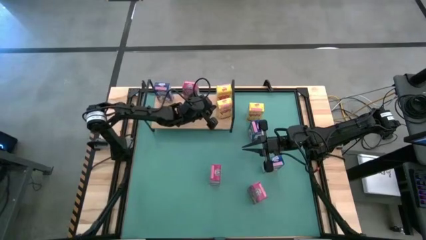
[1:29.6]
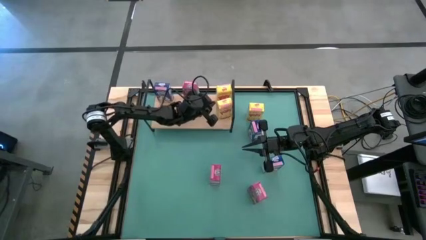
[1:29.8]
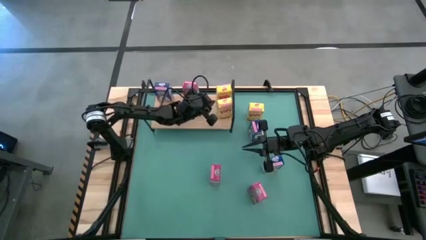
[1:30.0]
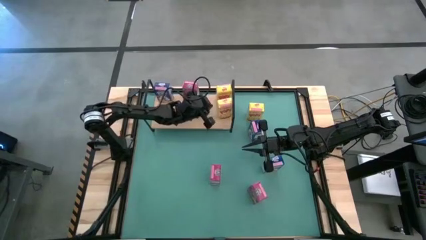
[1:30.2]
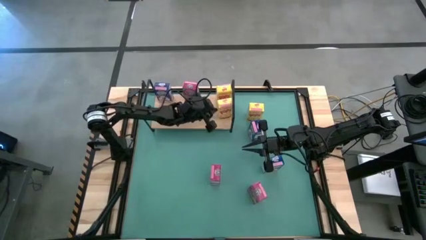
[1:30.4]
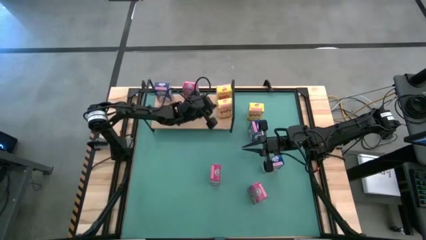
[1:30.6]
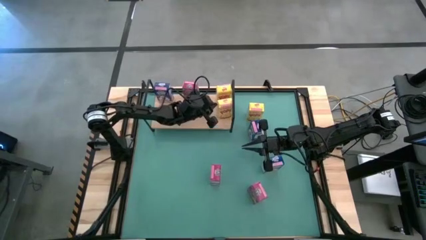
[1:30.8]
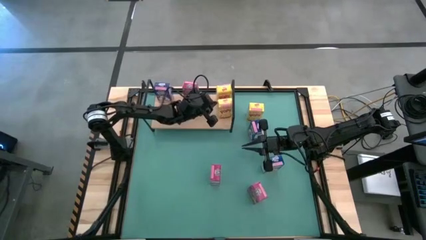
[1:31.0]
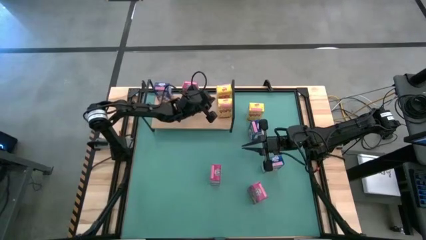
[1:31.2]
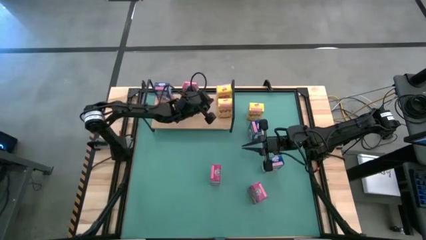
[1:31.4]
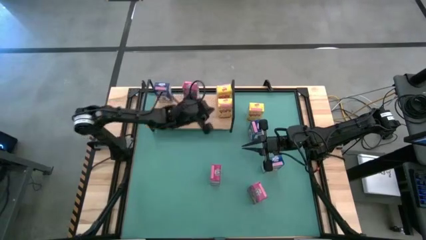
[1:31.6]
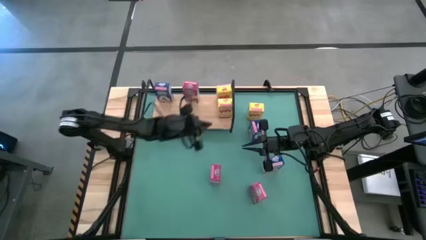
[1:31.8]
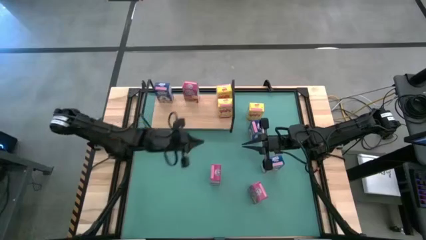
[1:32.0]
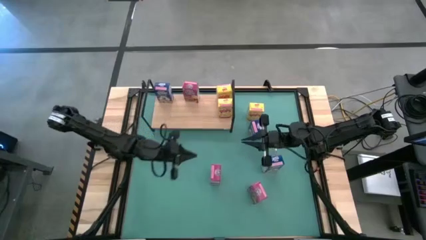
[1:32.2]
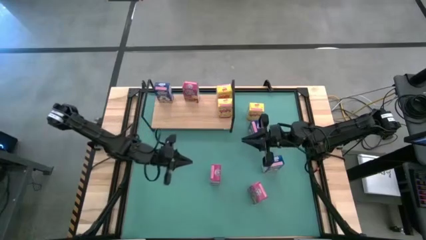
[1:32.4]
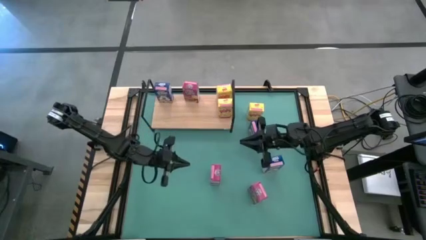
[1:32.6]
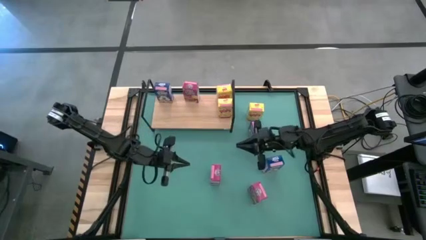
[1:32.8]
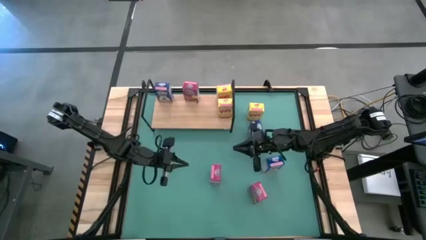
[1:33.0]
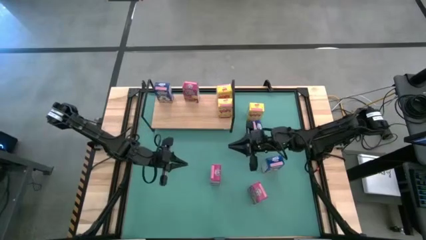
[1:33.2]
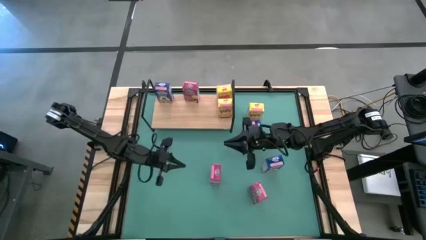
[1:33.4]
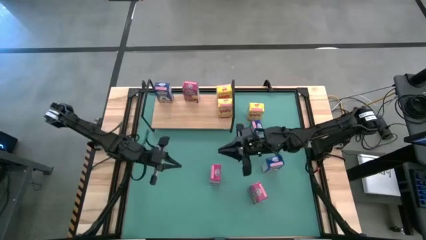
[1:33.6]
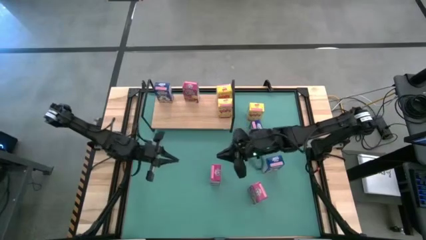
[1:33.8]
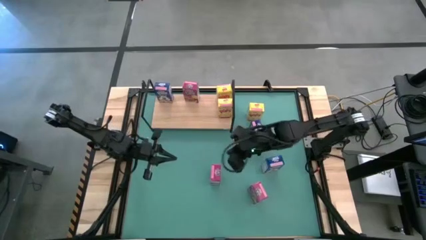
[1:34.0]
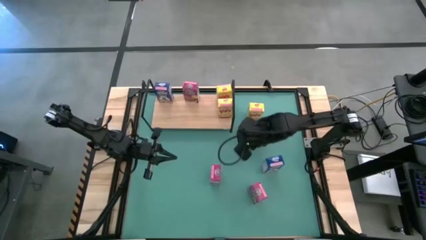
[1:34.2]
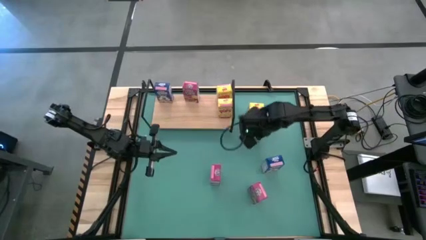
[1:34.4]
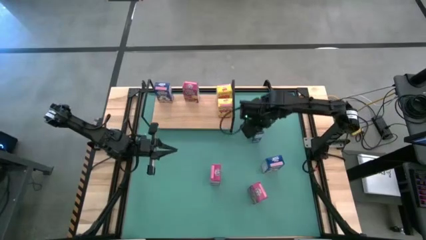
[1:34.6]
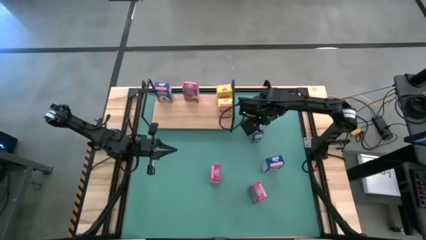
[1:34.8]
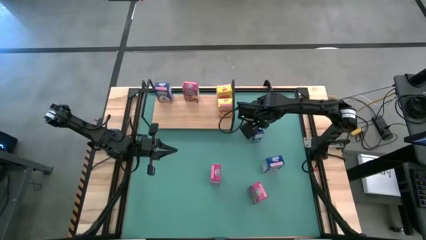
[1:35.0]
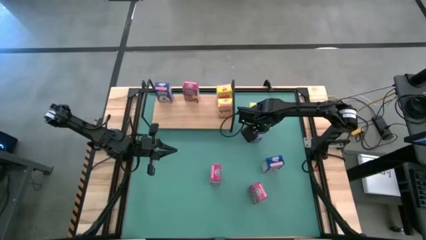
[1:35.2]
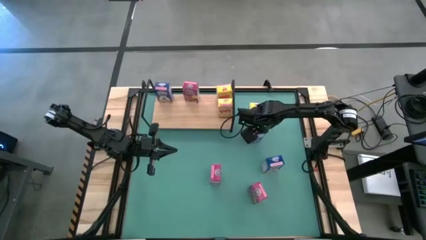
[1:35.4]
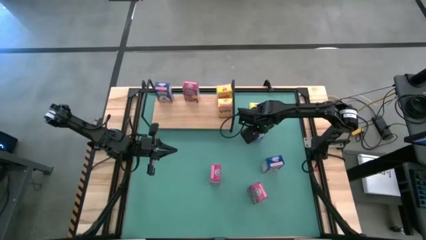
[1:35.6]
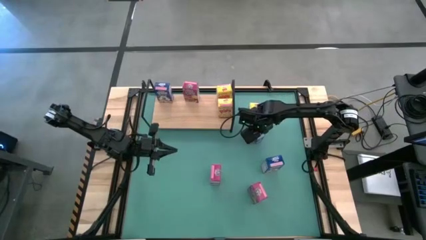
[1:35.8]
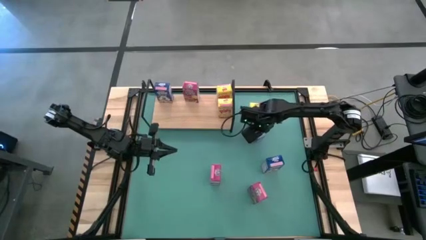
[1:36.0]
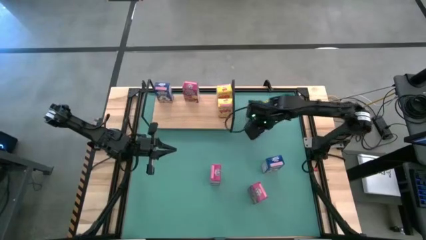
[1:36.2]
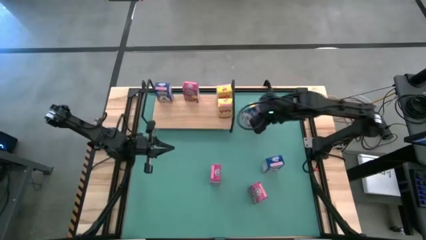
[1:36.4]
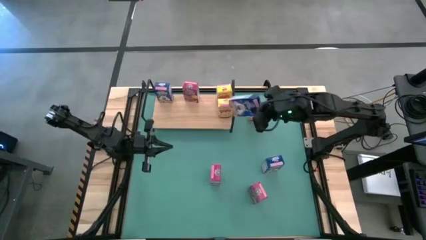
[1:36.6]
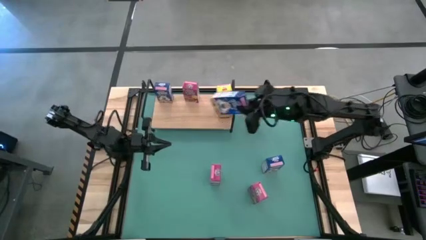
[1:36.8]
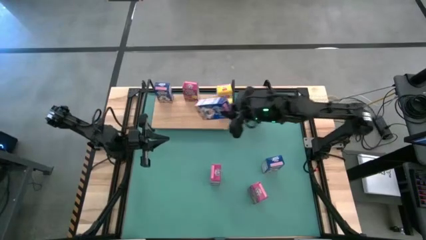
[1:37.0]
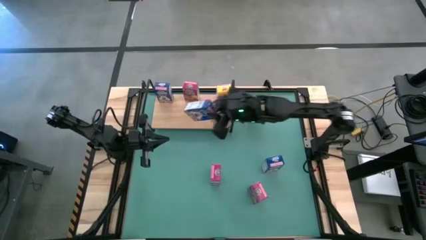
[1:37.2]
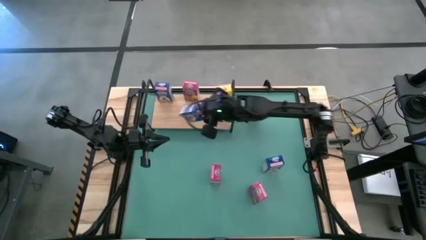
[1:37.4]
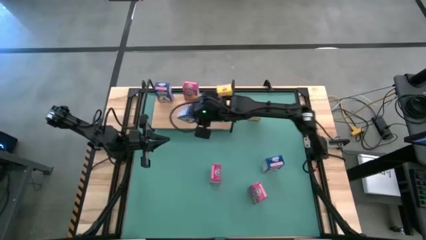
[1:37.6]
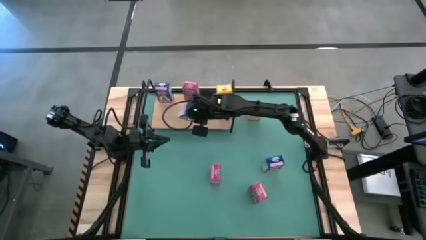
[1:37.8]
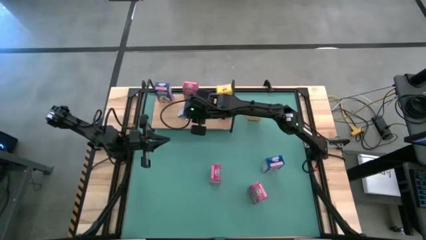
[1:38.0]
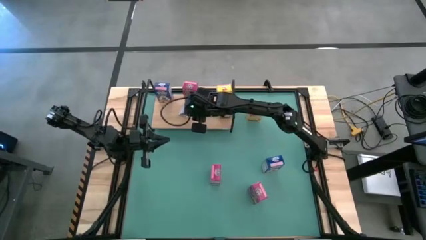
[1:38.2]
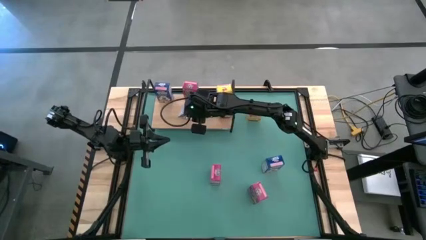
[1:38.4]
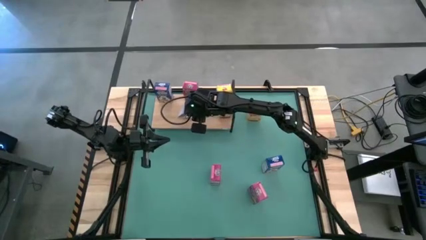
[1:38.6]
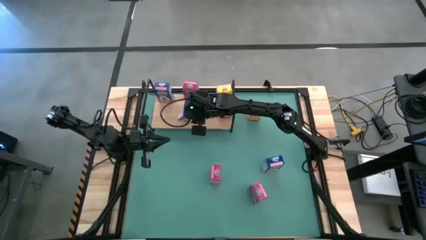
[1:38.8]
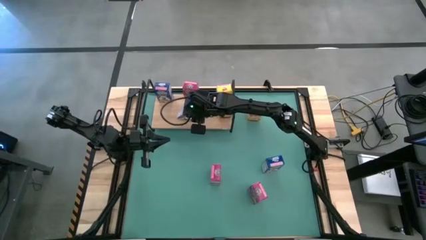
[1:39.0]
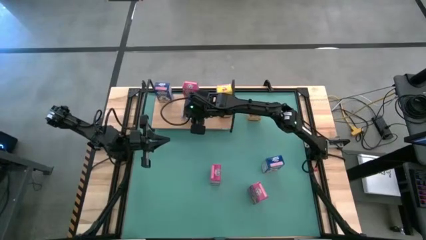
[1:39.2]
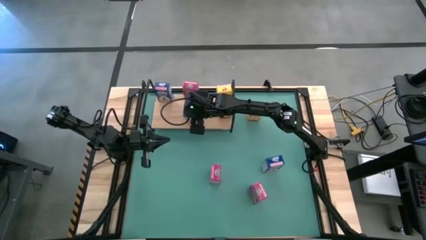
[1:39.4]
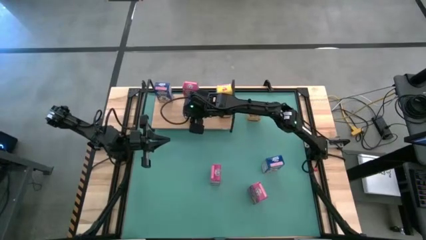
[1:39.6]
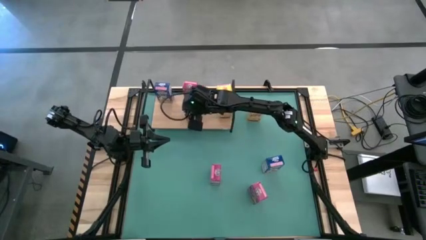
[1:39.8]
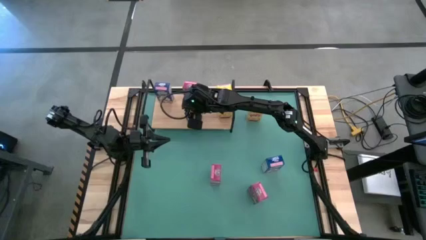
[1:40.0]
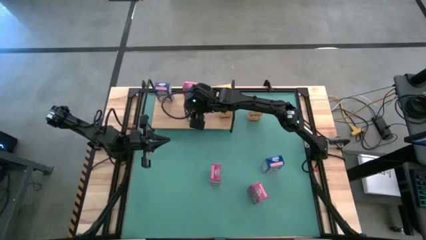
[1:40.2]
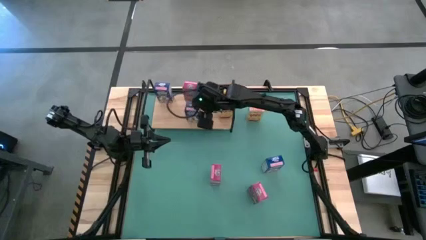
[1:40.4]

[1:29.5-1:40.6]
Task: Stack cereal on shelf
Put the top blue cereal box on the shelf

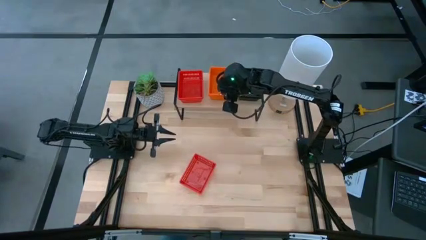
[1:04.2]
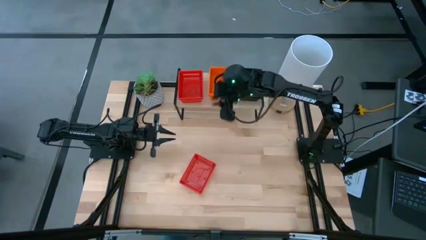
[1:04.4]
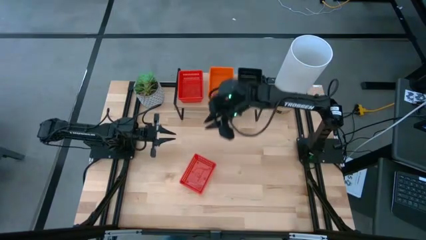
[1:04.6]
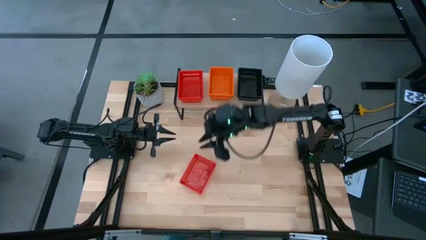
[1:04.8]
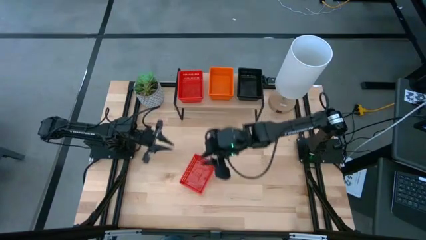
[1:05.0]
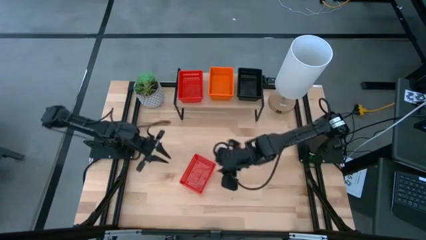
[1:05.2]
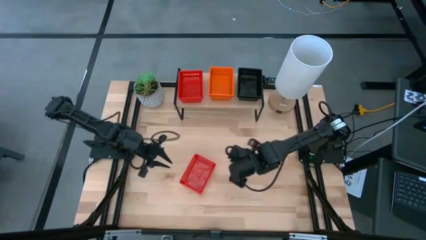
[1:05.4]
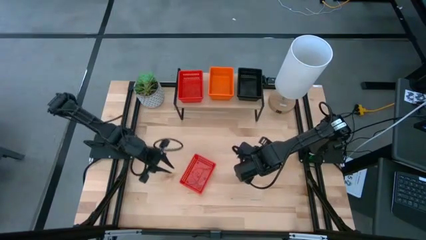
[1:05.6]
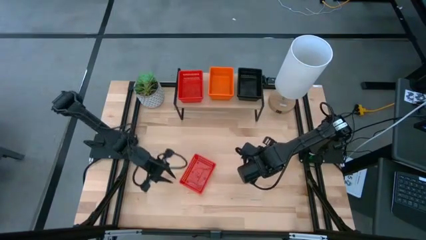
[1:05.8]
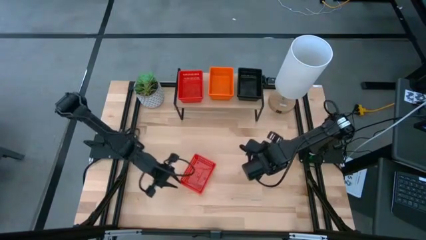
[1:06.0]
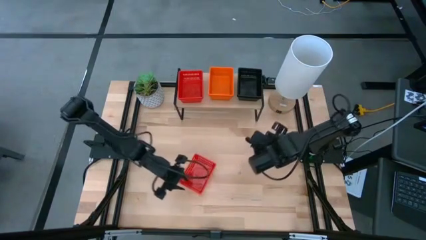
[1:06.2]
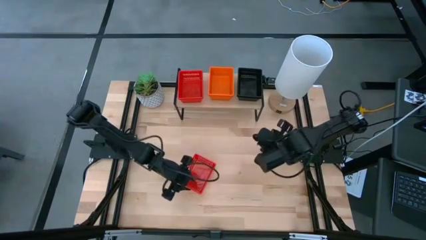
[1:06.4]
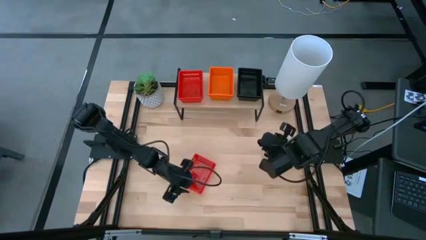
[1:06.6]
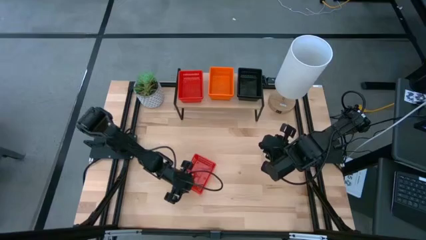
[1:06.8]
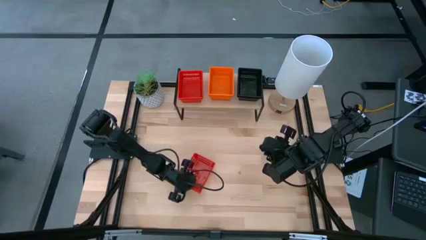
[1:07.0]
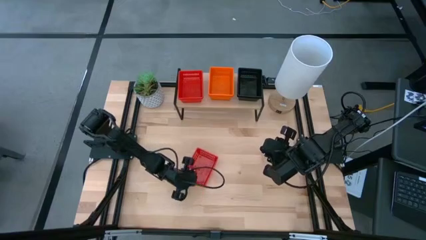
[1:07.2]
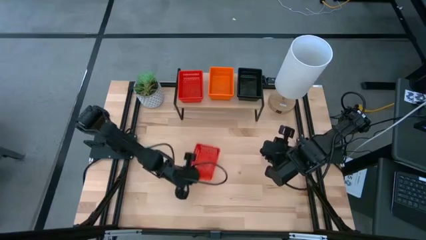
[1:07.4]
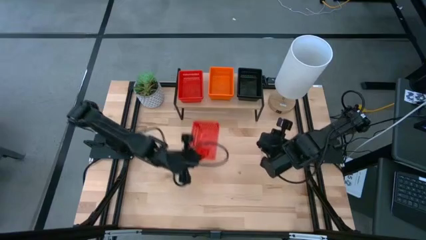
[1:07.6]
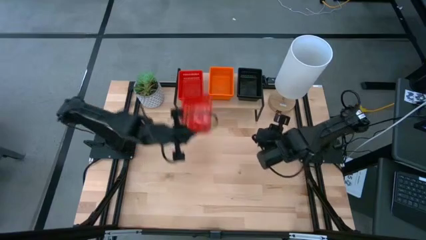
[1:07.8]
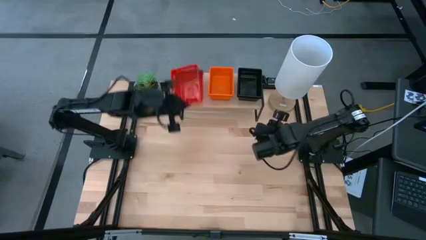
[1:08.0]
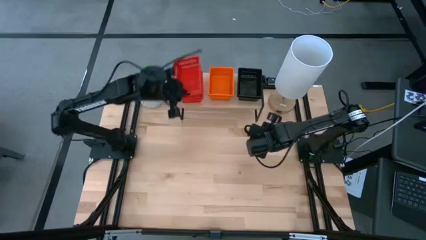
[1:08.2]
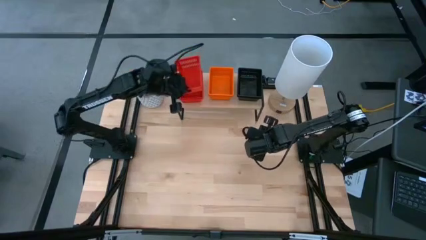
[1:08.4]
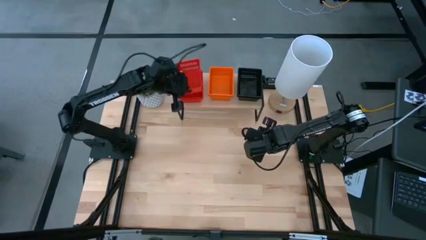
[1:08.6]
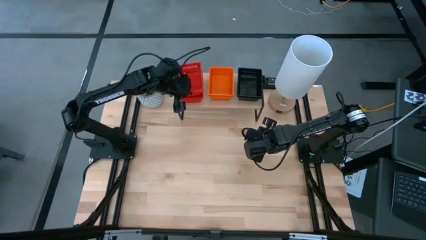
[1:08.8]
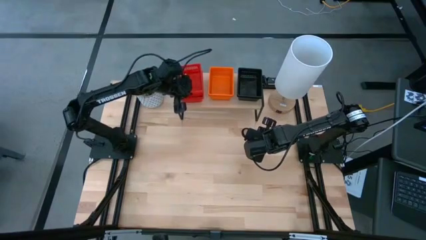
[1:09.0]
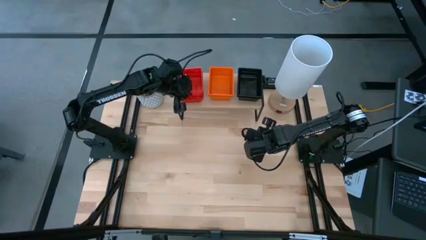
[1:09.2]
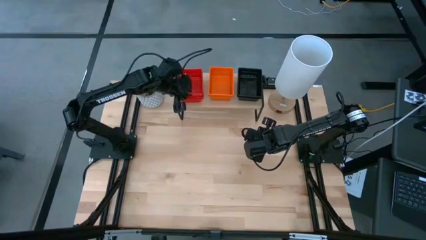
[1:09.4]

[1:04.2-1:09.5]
Task: Stack baskets on shelf by color
Stack the red basket on the red basket
